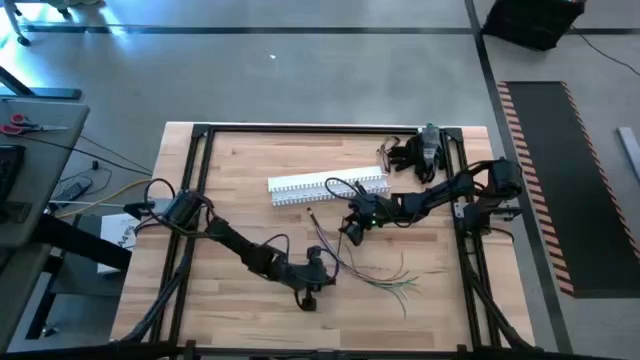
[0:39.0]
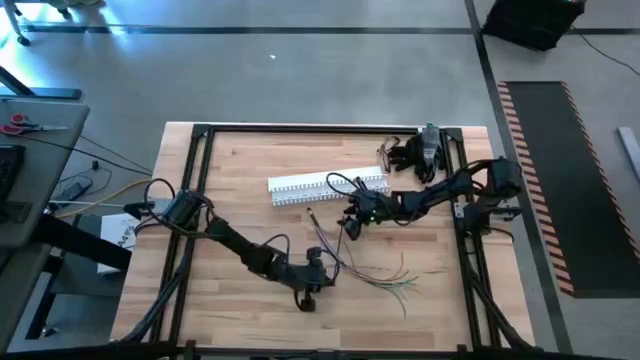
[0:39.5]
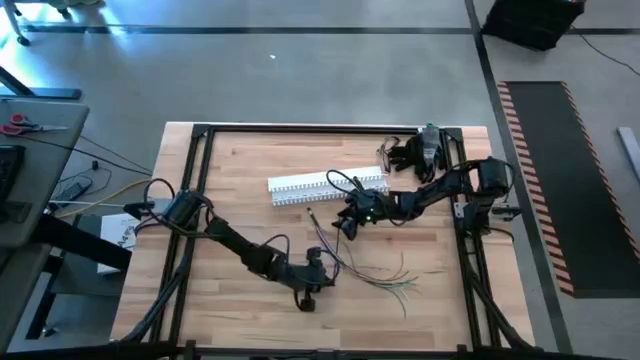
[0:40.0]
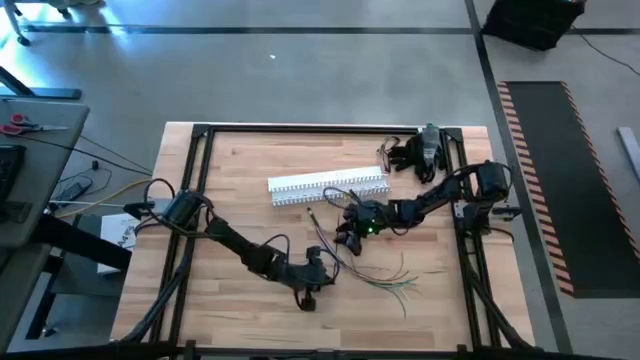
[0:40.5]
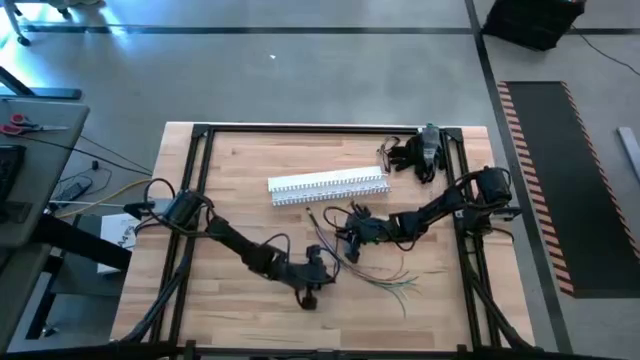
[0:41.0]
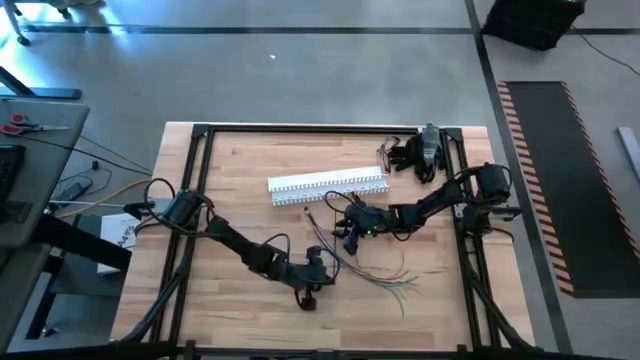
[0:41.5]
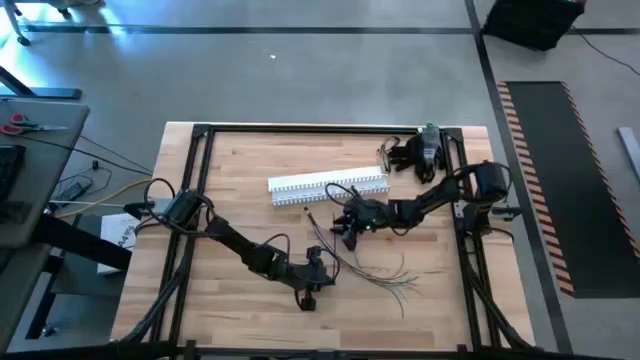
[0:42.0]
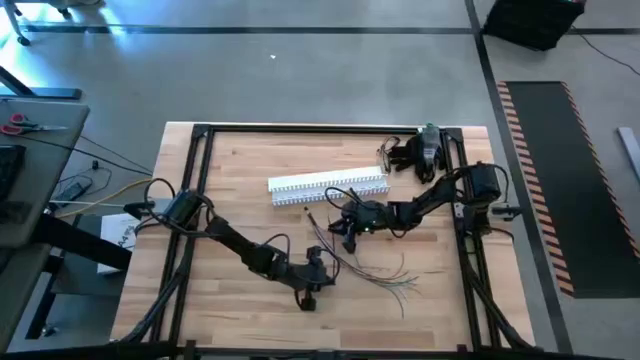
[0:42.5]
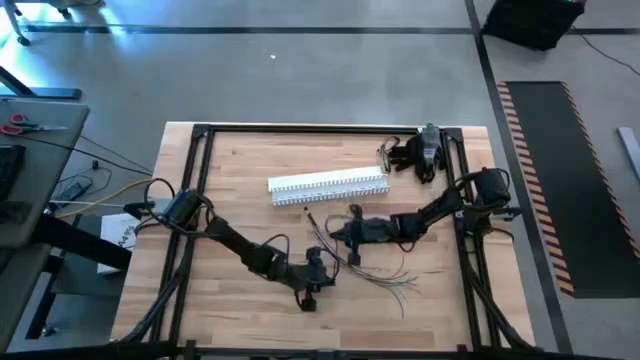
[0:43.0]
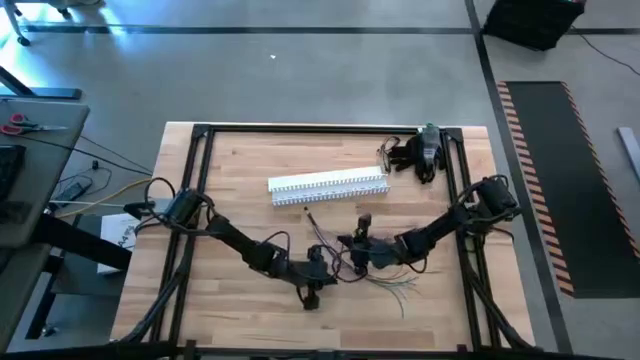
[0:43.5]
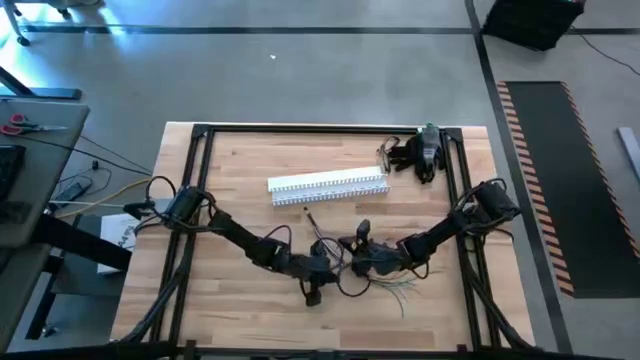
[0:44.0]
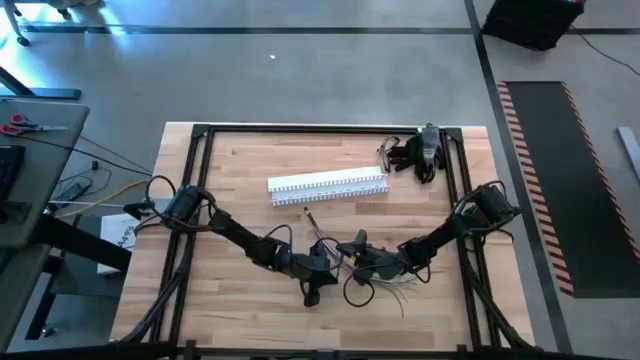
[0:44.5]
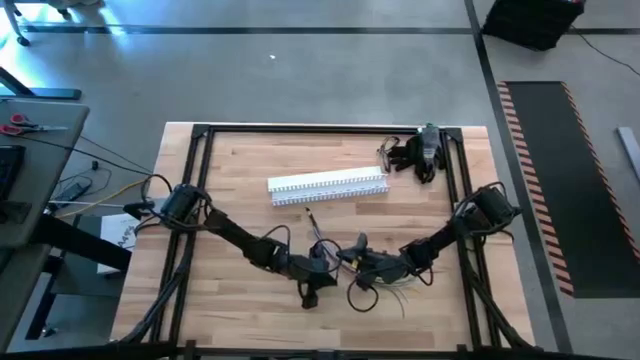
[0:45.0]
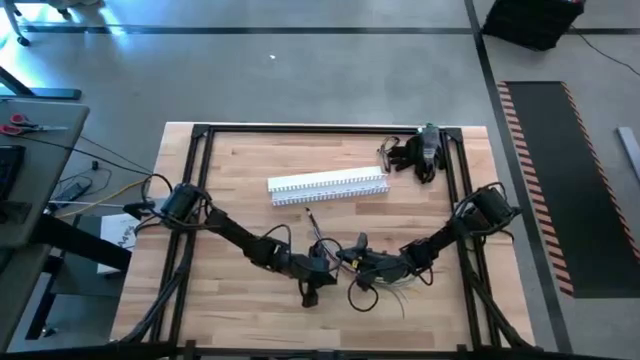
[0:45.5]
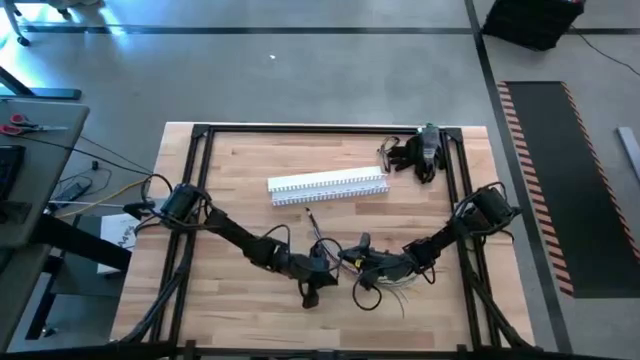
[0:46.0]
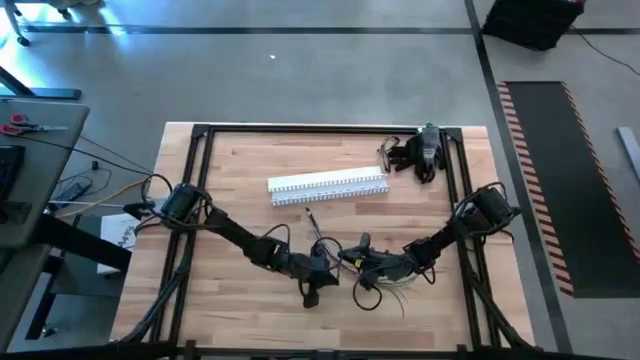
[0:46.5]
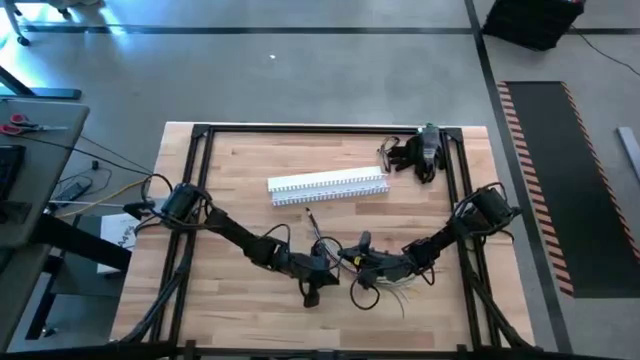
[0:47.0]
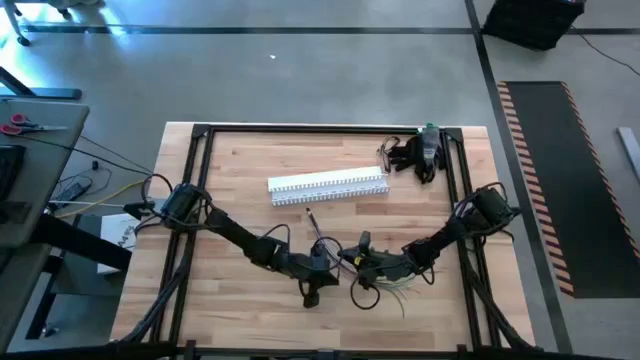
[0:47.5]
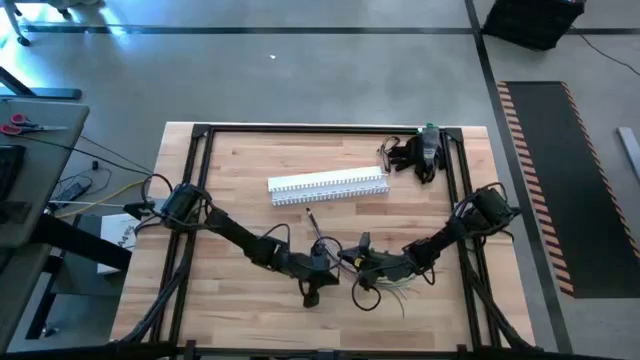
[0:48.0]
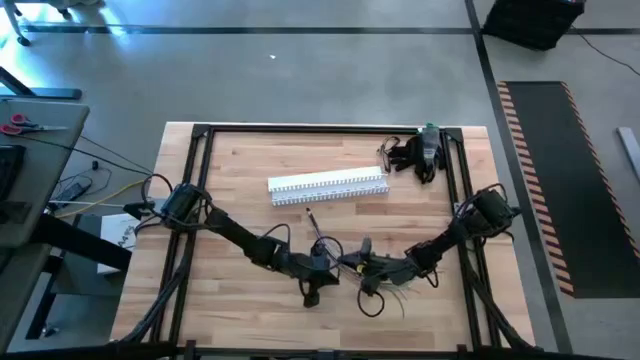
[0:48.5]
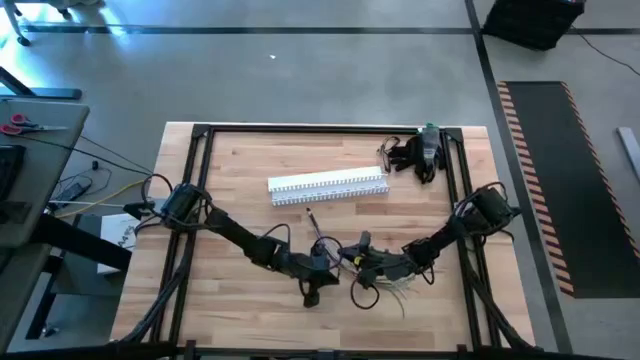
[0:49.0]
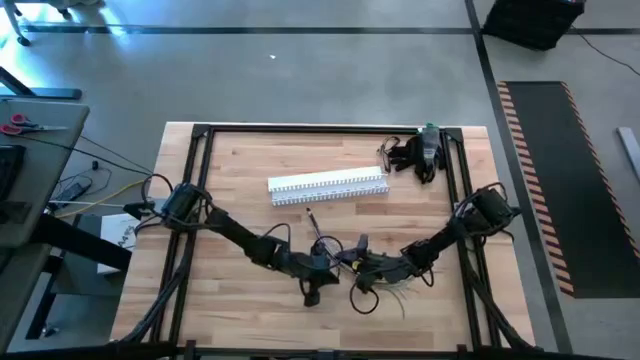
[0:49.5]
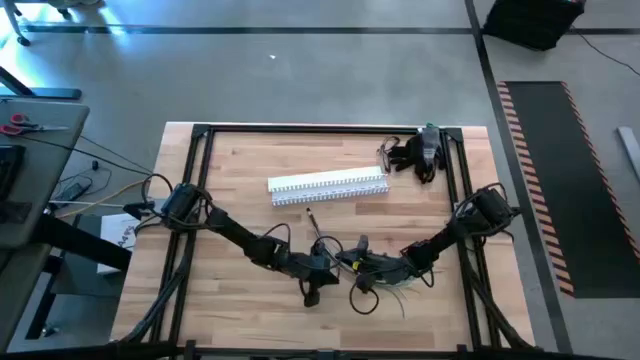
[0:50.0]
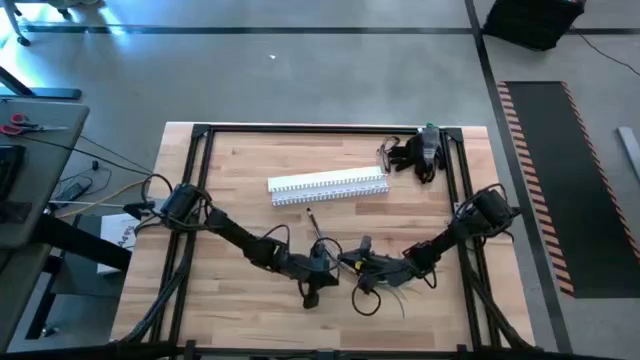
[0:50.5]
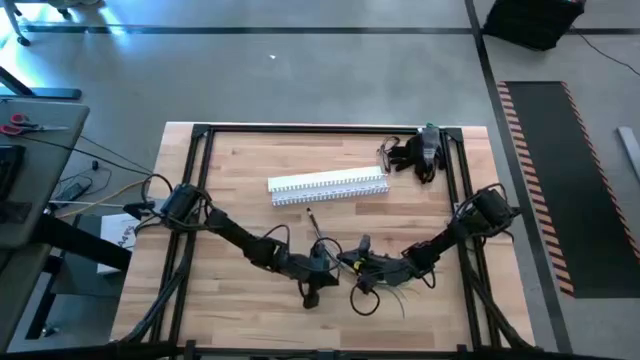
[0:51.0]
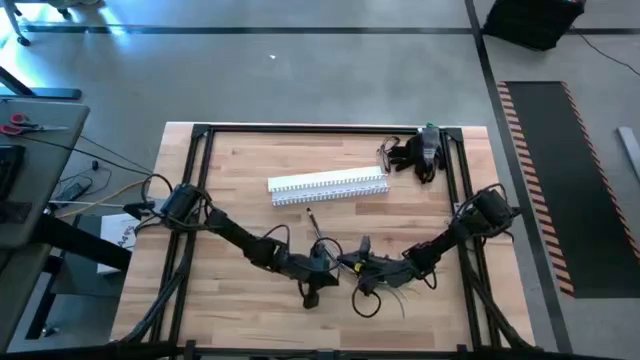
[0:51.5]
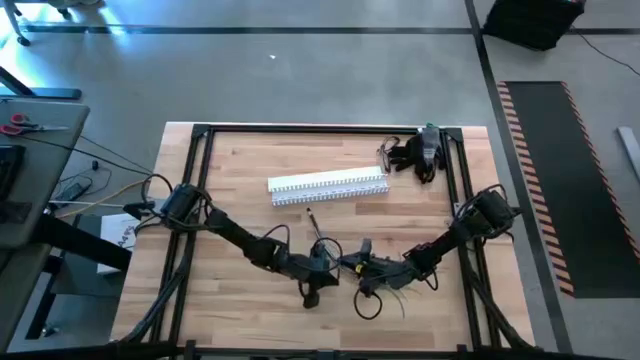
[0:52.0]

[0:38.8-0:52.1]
Task: Ziptie cables
Wrap the cable wires with black ziptie

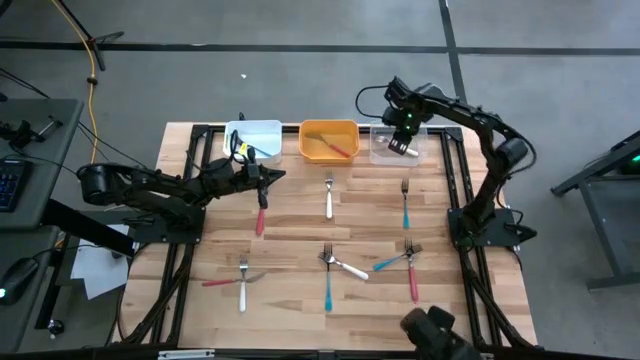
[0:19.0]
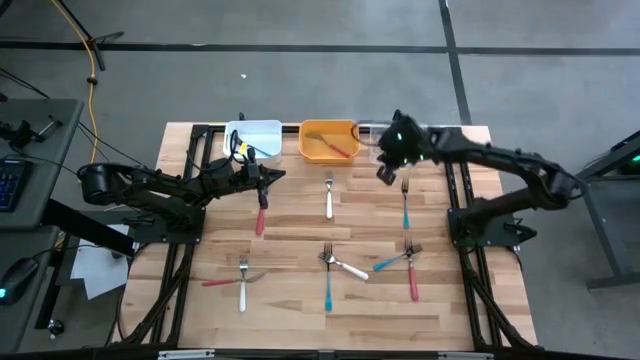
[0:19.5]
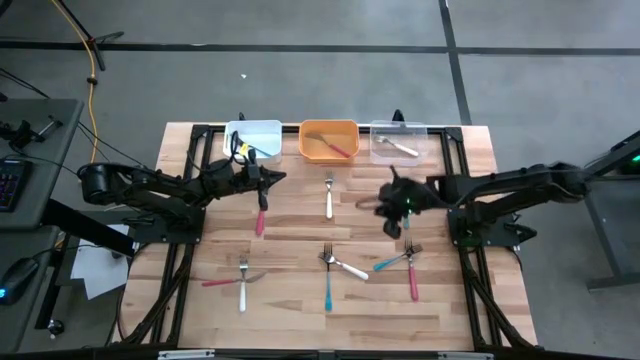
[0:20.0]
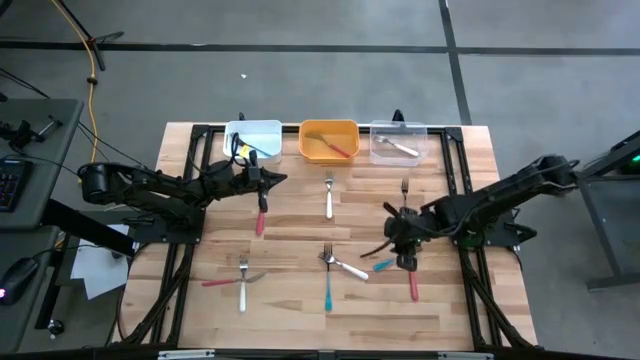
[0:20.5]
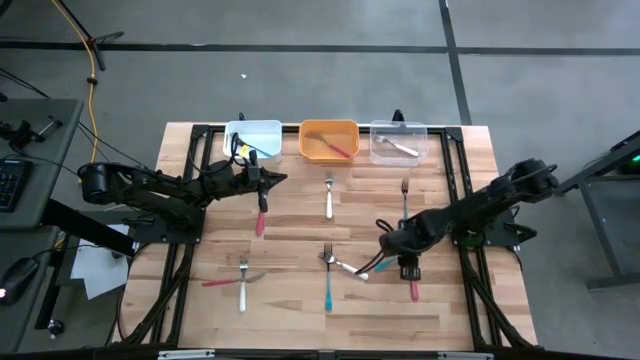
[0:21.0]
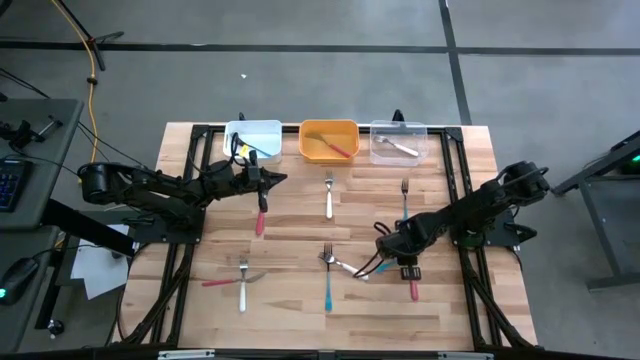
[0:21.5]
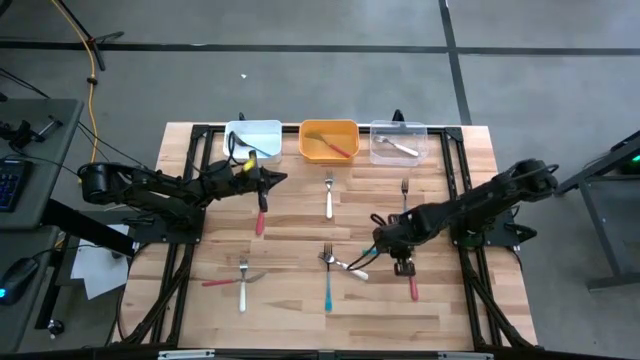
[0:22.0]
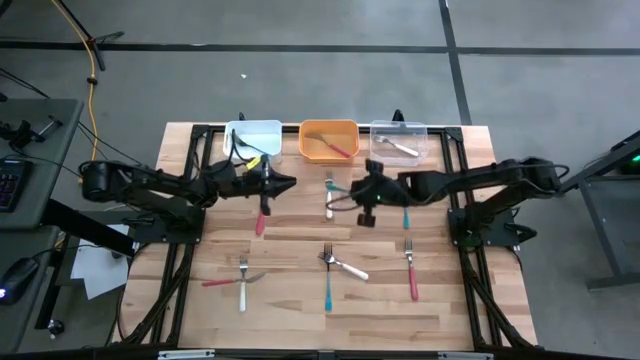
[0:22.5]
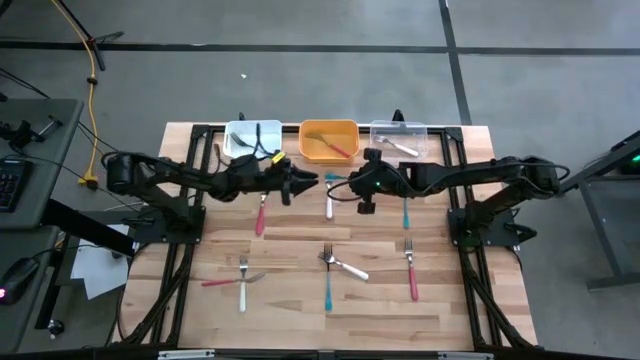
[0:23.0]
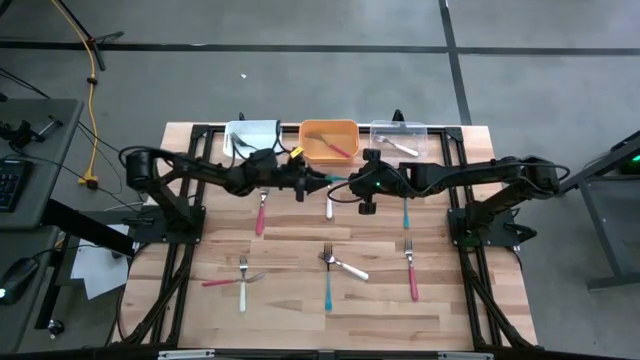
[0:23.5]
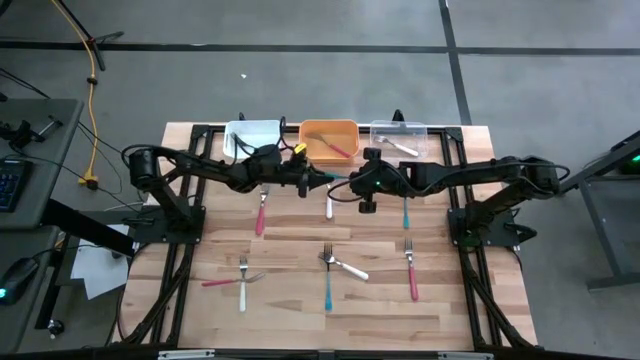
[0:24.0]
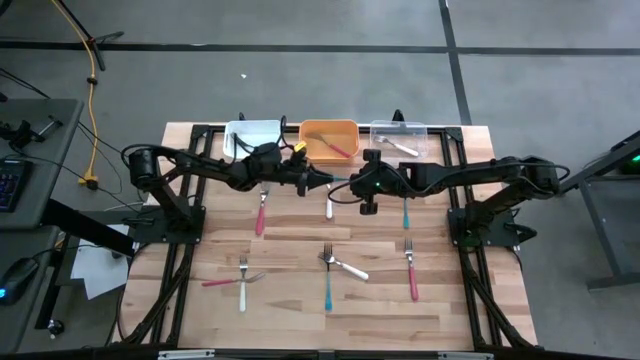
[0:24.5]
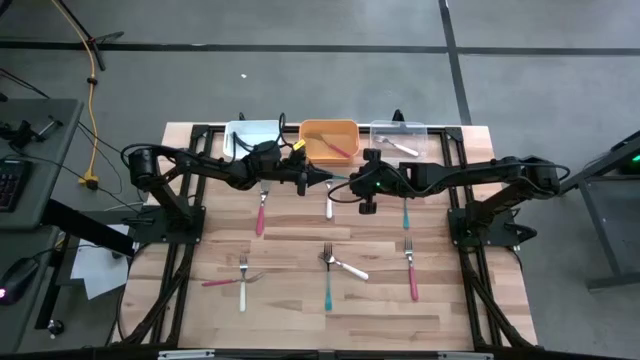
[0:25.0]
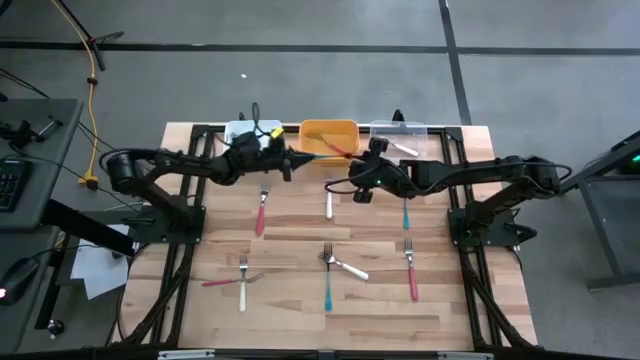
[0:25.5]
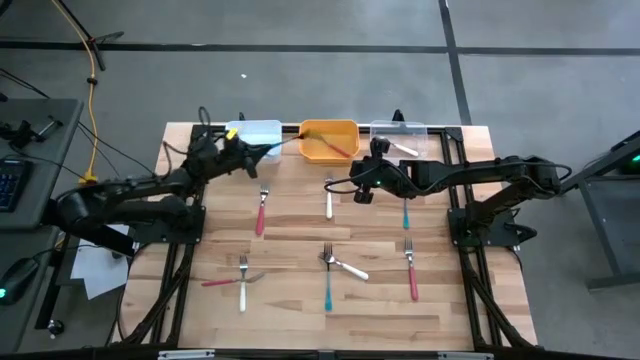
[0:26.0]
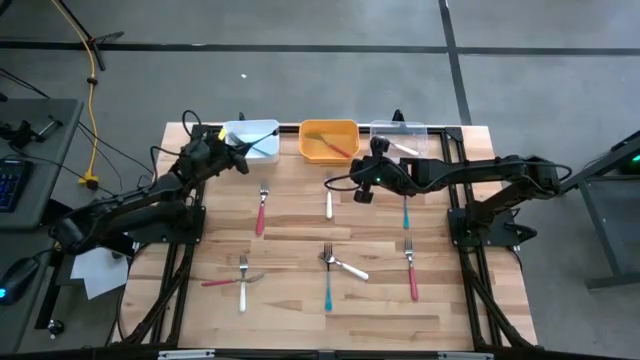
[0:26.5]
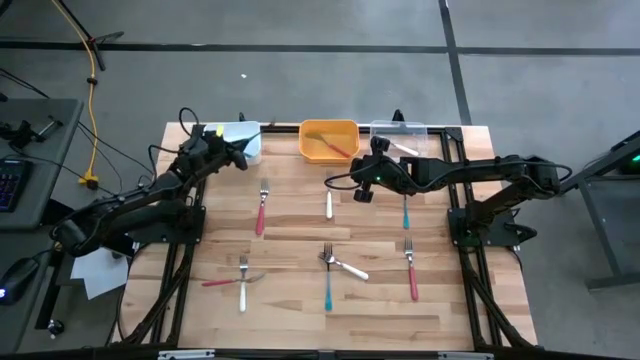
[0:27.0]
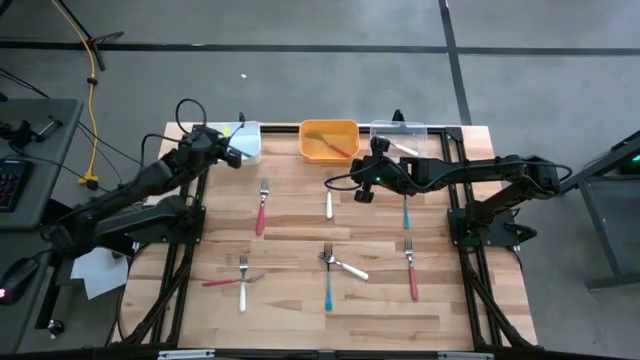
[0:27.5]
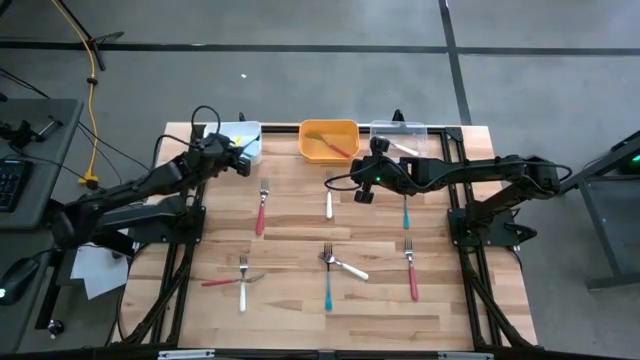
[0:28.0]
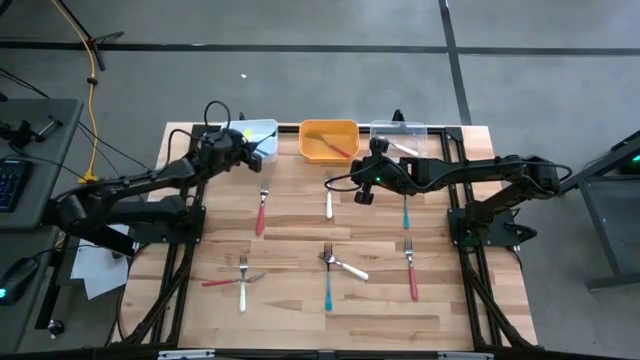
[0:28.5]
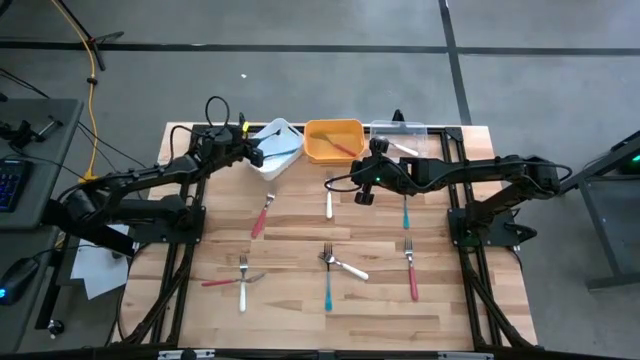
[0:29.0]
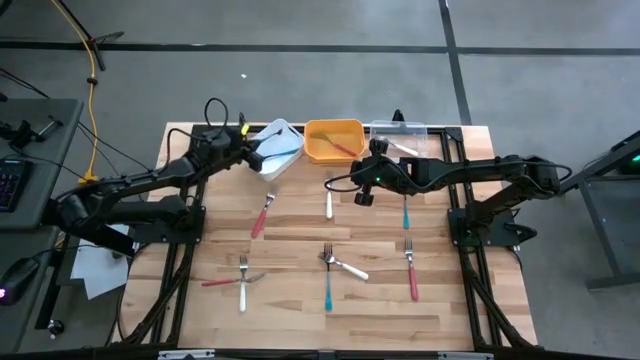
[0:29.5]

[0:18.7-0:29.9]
Task: Sort silverware by color (type)
Put the bottom right blue fork into the white bin
